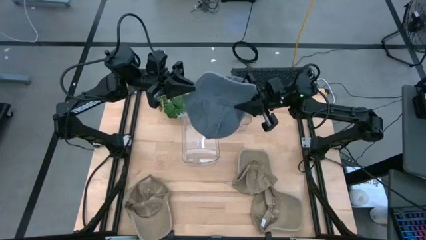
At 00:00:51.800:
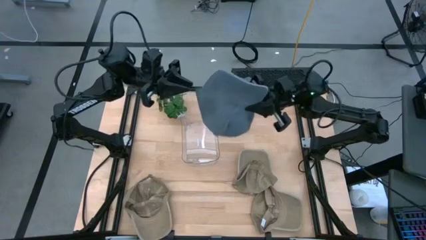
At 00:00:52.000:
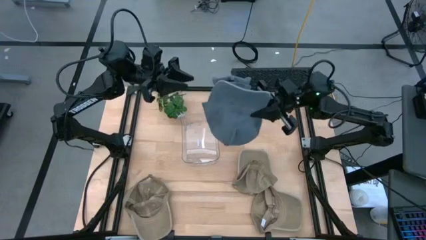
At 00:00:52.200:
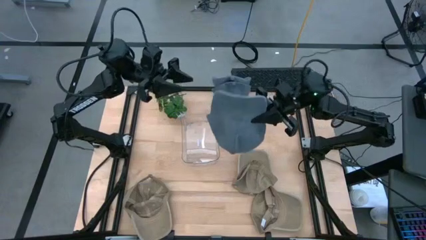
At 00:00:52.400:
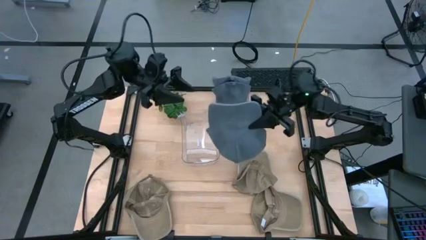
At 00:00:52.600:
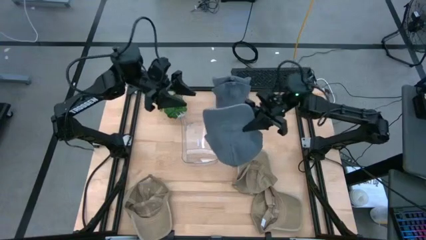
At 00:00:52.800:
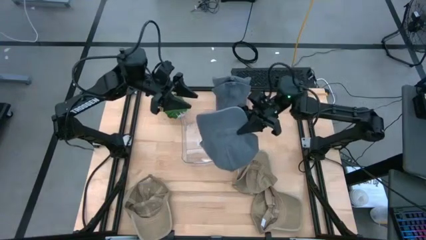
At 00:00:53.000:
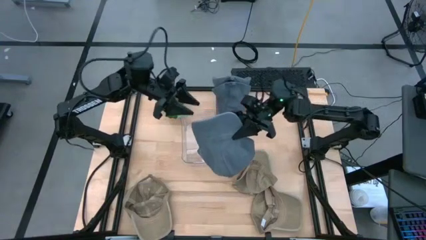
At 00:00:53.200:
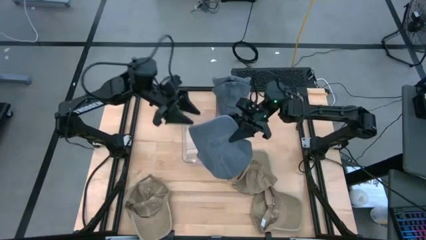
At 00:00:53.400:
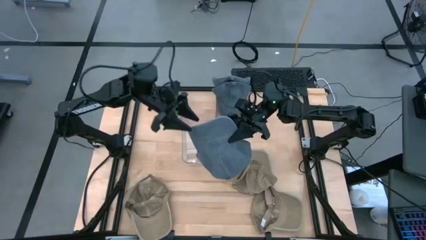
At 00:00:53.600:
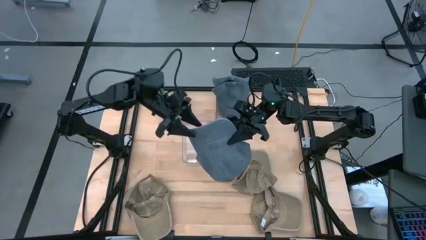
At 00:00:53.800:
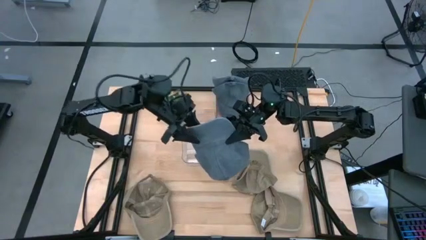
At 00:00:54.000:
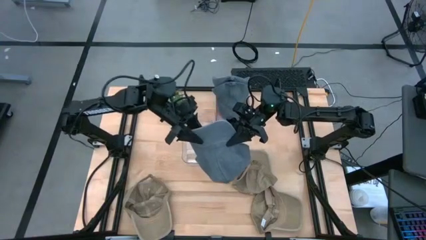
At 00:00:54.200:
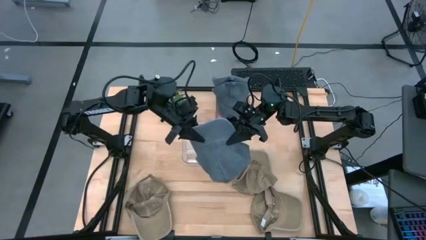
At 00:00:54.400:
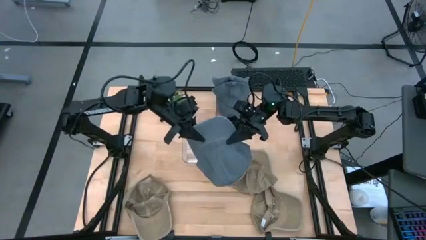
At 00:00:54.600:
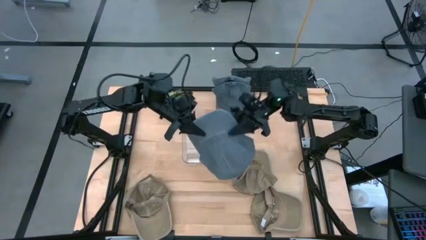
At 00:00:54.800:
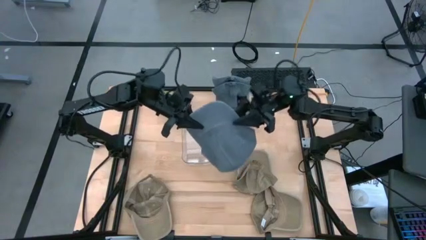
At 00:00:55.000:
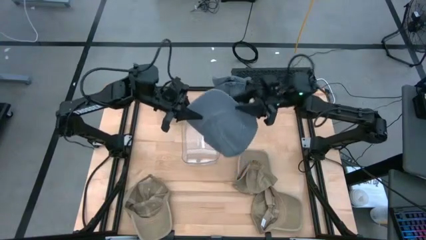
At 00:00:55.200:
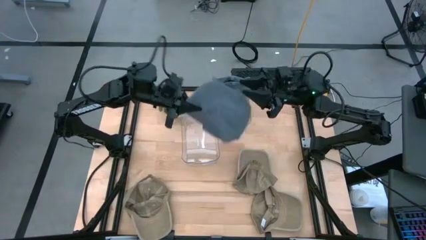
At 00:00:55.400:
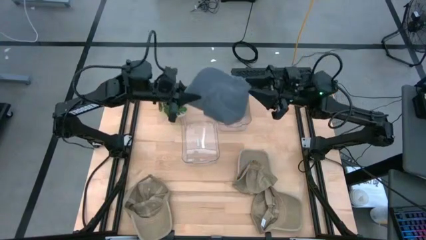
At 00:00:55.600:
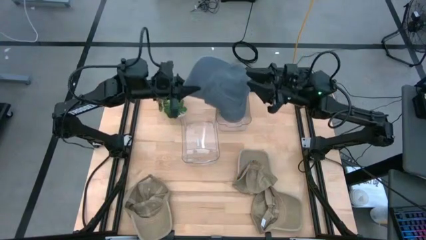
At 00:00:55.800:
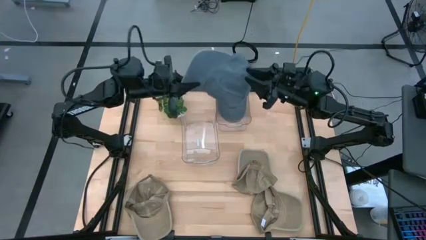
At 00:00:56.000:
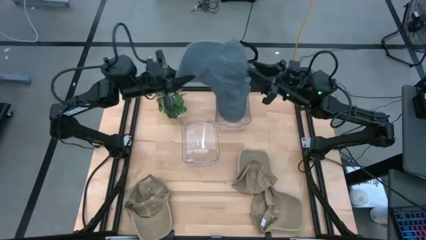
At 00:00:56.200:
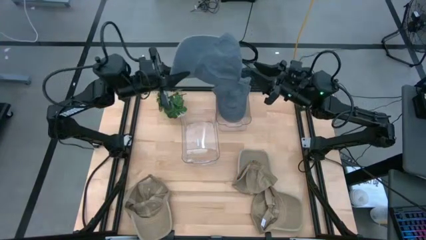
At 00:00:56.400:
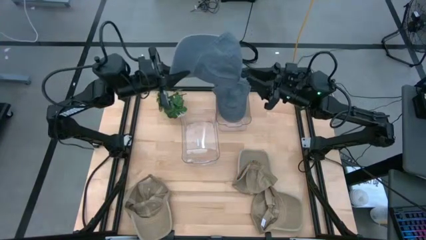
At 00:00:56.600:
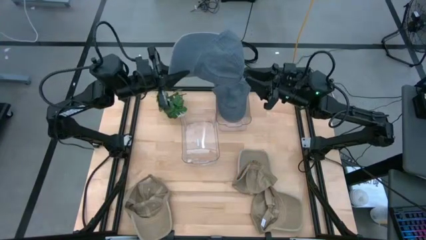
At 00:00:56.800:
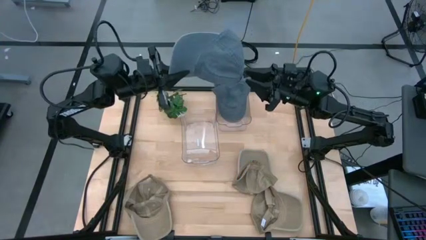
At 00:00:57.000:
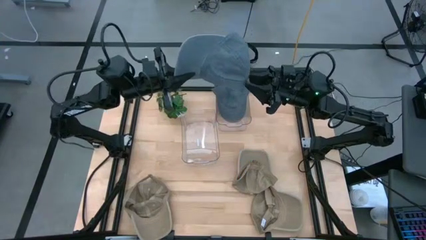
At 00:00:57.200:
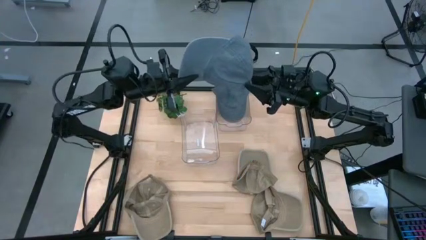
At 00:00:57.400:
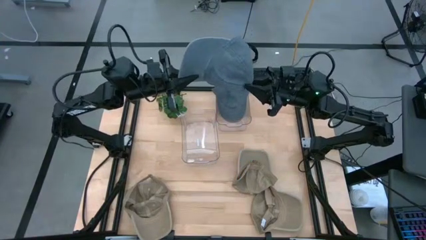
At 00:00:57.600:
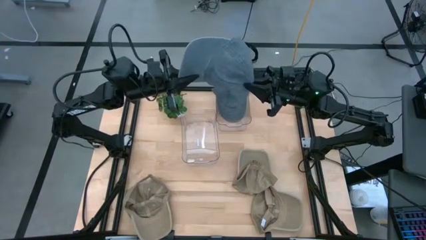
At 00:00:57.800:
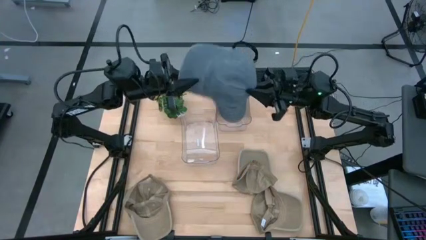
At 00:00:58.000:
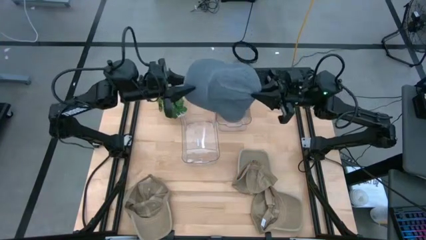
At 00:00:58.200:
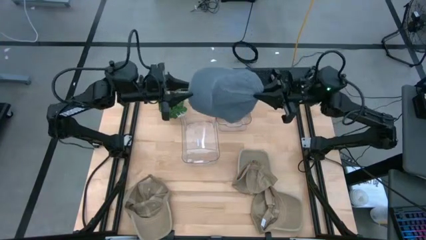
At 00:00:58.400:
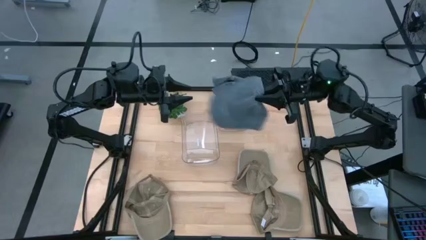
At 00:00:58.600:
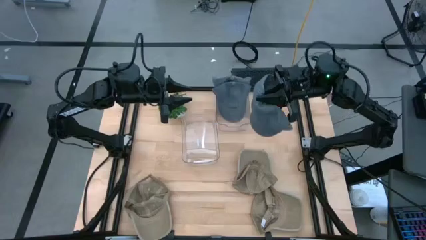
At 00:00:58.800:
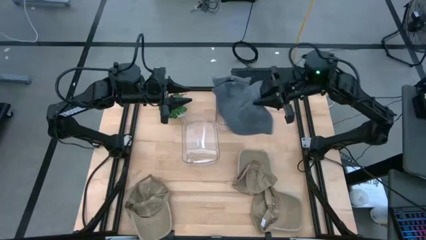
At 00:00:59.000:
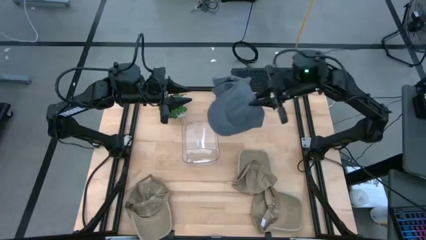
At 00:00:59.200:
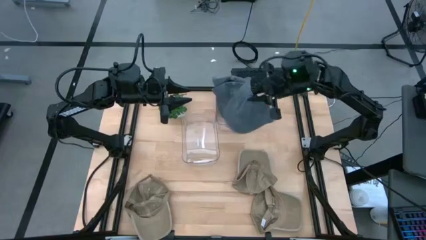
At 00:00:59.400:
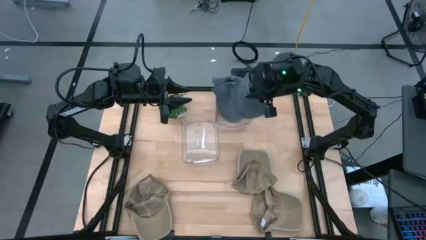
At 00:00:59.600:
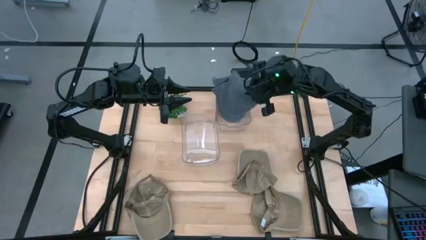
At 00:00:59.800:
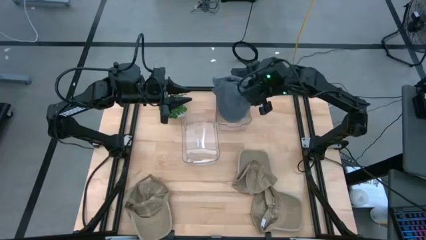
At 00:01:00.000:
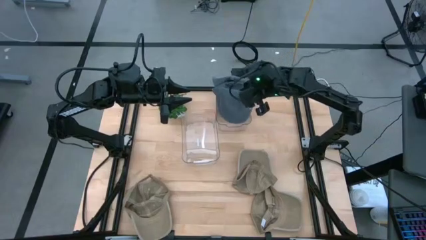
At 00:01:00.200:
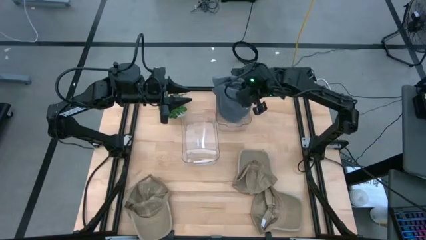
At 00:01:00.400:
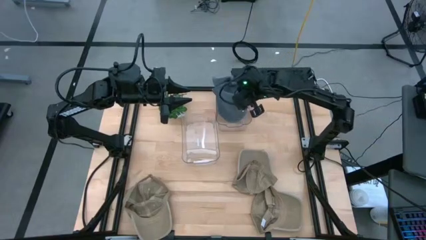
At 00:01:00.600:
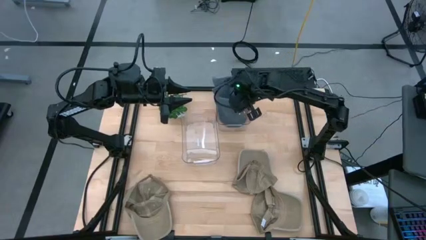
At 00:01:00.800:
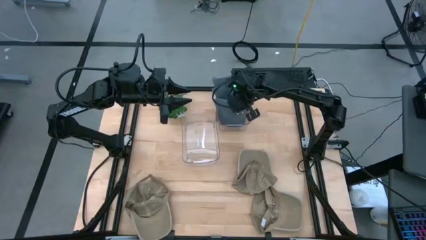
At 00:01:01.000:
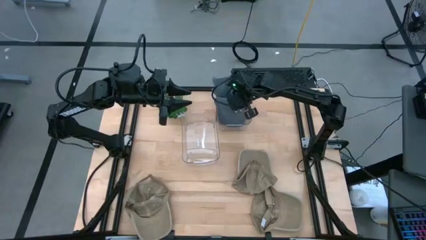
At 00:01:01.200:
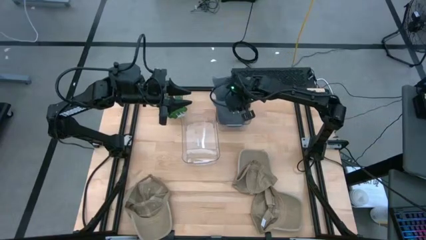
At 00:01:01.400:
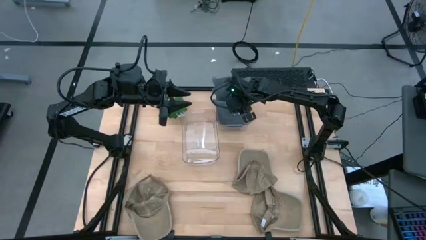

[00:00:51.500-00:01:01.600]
Task: Pick & Place hat
Put the ash blue cap into the right transparent bin

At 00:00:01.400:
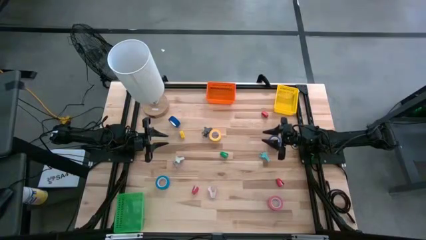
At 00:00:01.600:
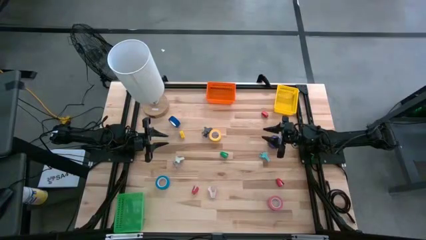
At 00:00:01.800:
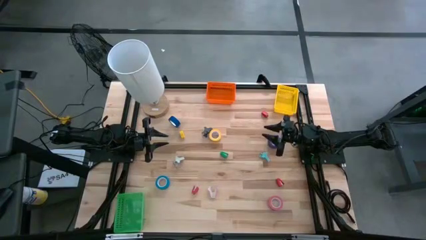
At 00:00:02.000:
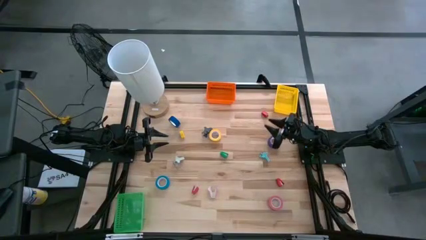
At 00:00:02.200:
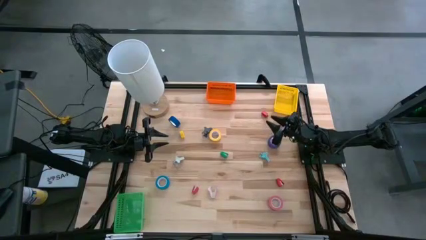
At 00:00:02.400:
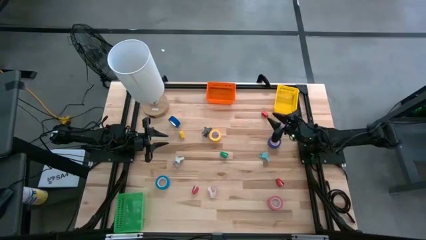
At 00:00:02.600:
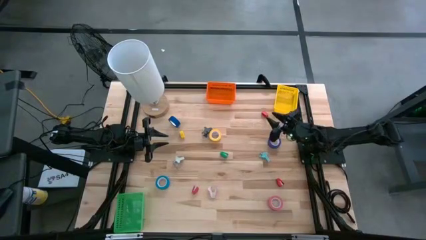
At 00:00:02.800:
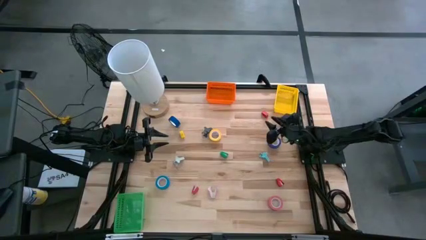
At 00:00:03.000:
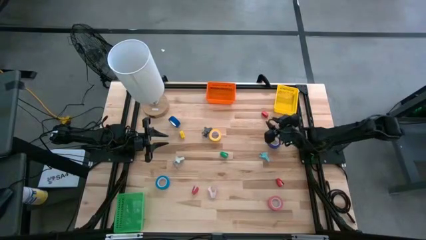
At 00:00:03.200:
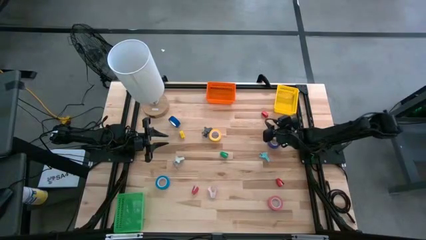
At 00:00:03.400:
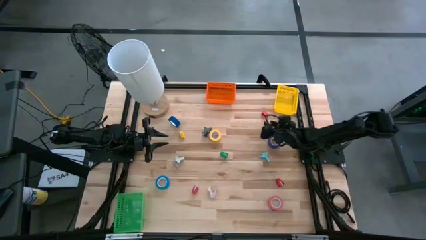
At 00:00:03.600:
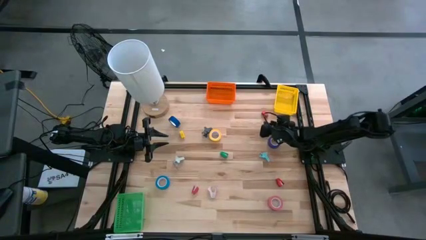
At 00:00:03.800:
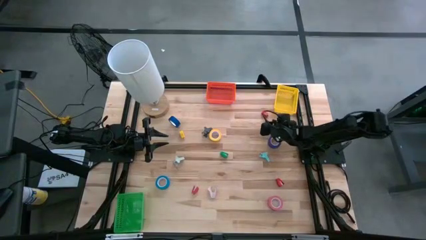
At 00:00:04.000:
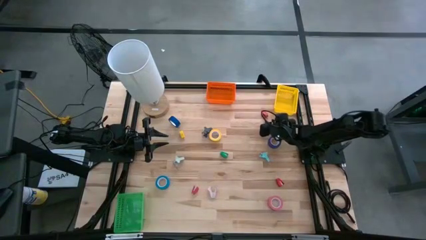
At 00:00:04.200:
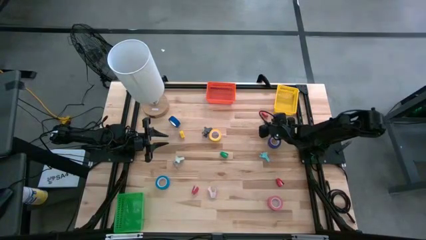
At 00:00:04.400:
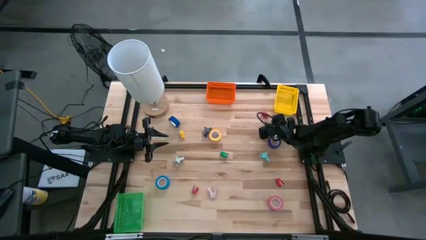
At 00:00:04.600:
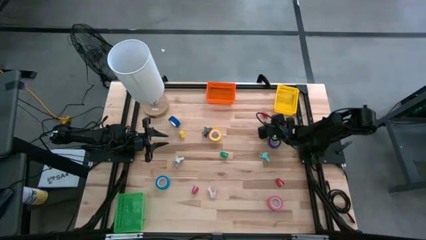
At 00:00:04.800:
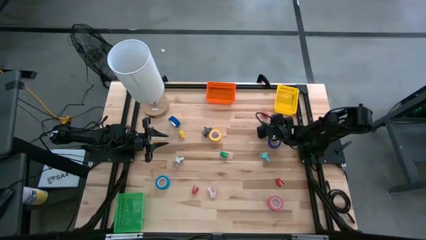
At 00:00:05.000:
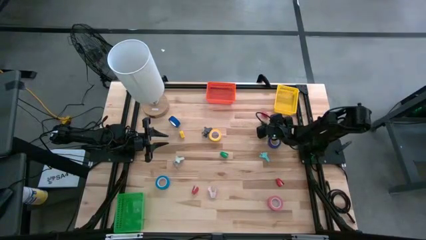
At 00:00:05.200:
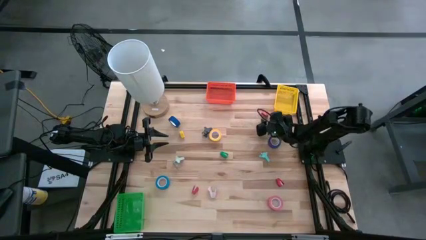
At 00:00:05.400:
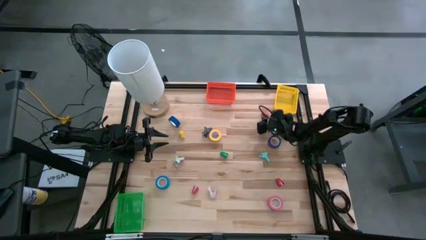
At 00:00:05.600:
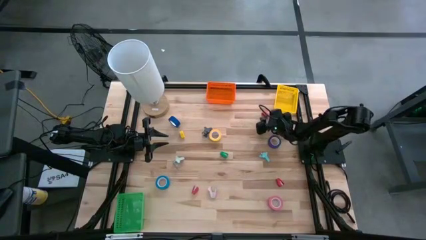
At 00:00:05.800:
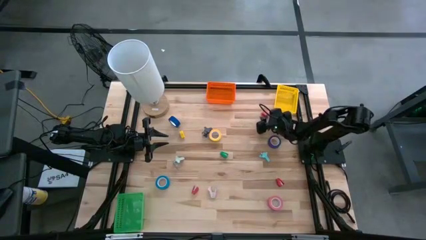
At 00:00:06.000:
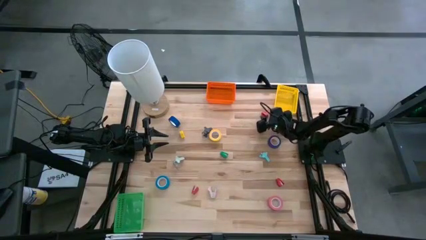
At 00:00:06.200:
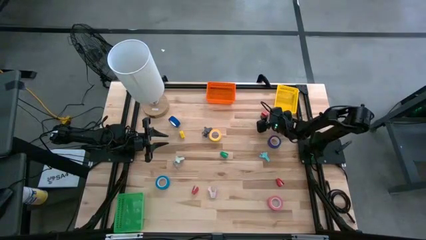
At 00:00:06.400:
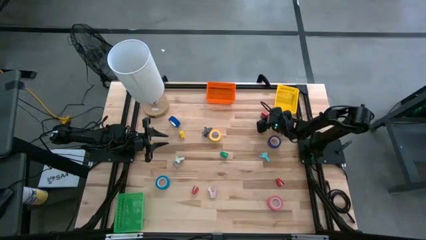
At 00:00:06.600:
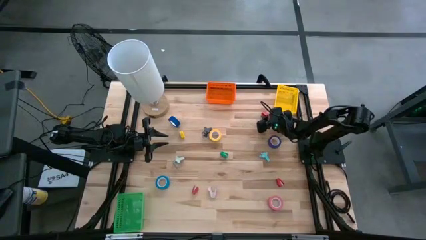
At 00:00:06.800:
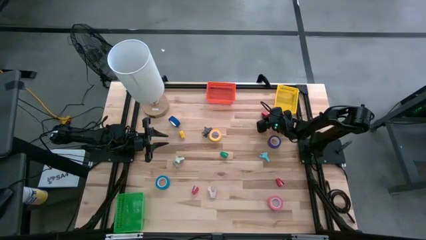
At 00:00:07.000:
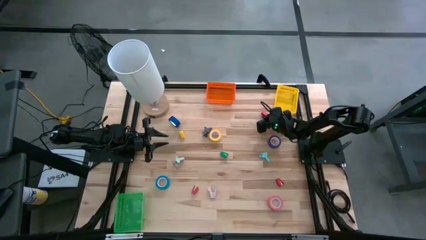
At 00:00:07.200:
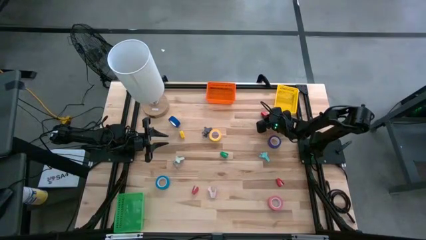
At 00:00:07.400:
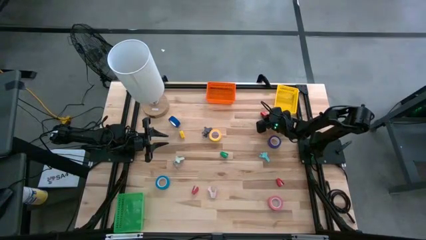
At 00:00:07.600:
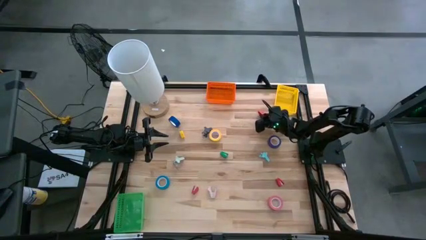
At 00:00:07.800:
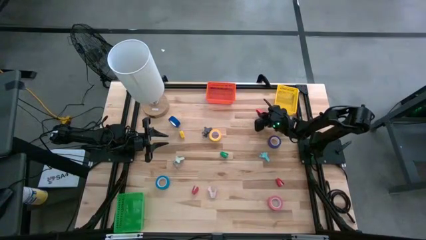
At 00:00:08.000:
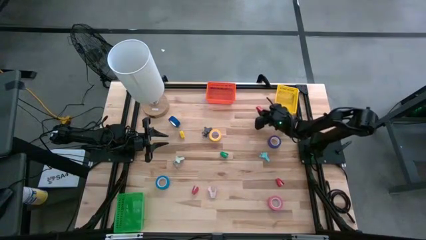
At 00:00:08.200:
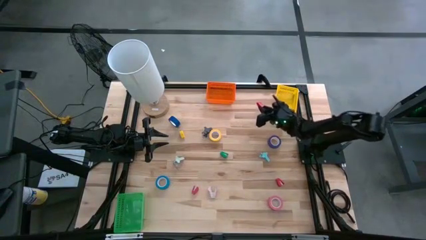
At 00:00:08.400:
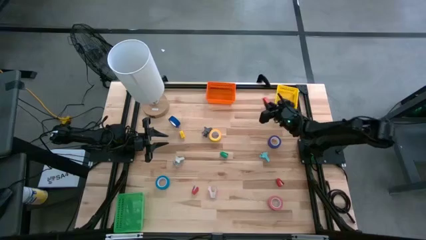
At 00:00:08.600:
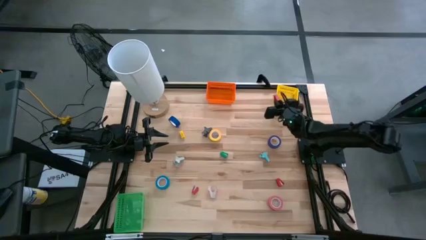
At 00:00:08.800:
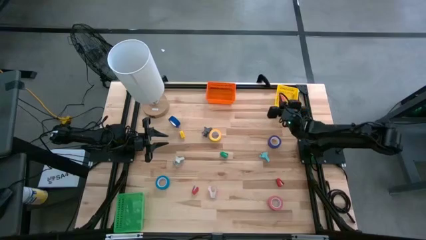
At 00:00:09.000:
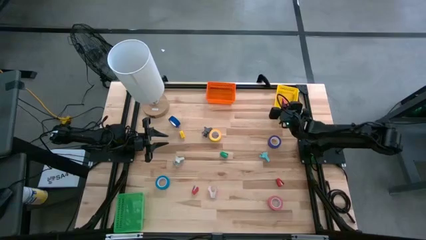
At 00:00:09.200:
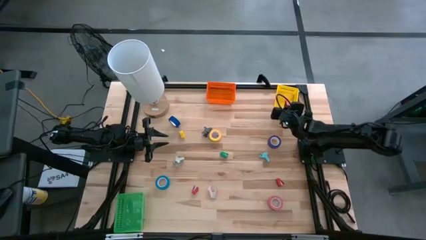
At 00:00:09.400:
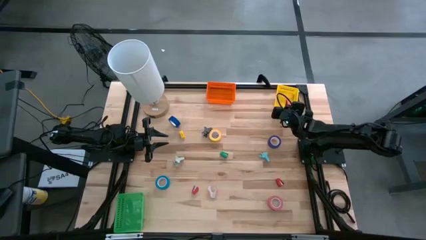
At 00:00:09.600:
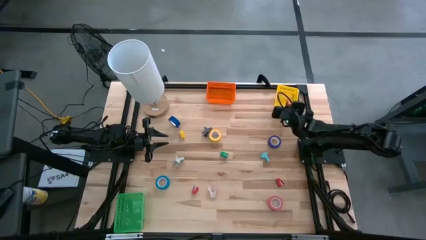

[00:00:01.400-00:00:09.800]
Task: Pick and place Stapler, Stapler remover, tape
Put the top mini red stapler into the yellow bin
